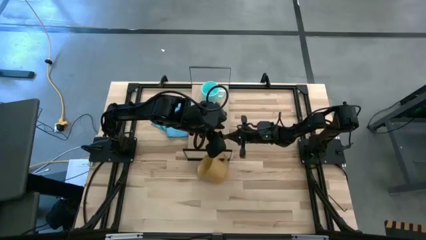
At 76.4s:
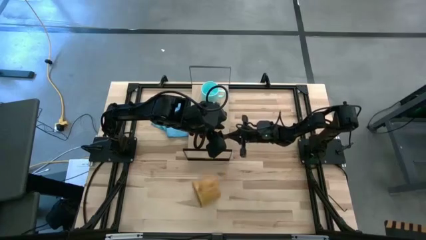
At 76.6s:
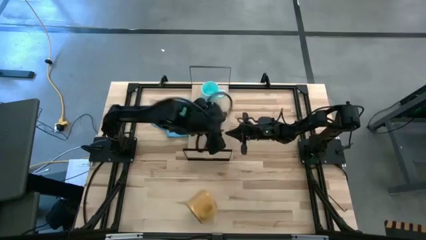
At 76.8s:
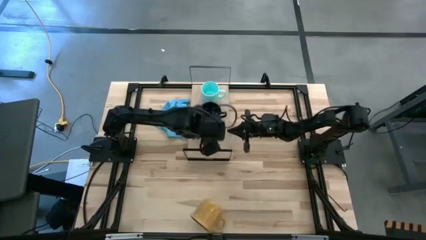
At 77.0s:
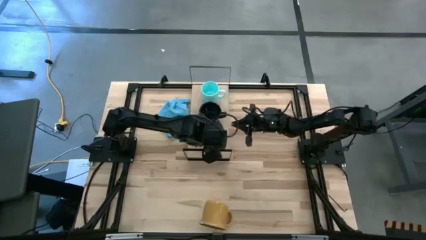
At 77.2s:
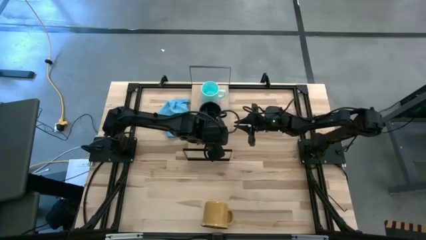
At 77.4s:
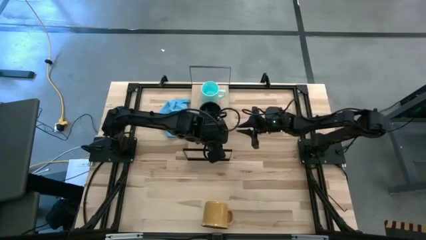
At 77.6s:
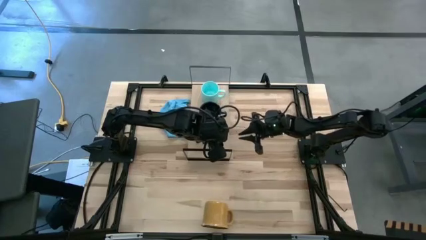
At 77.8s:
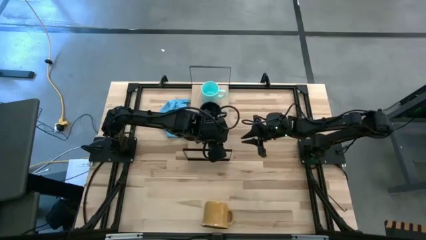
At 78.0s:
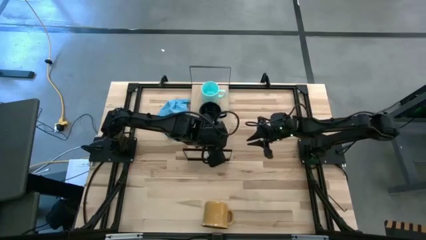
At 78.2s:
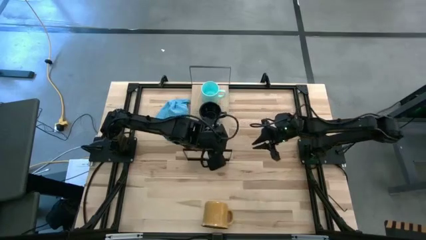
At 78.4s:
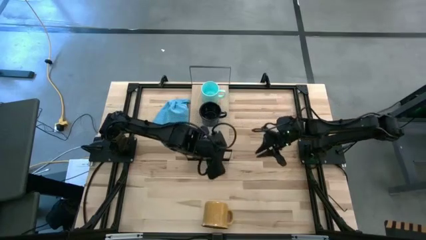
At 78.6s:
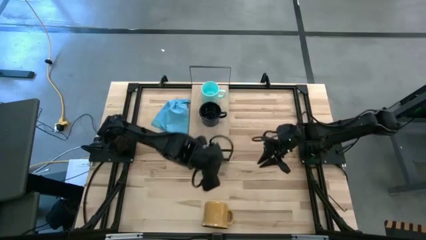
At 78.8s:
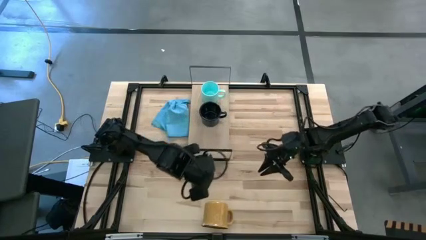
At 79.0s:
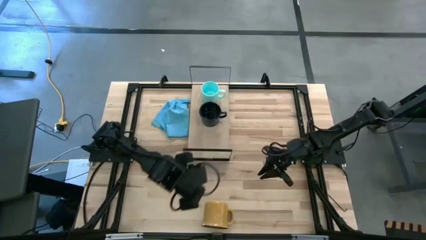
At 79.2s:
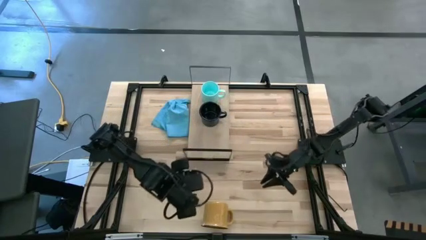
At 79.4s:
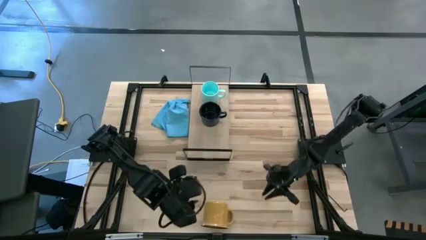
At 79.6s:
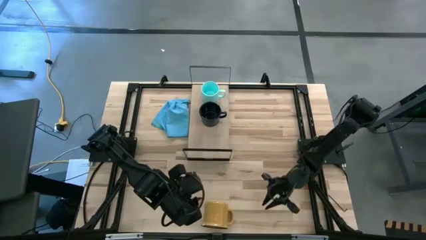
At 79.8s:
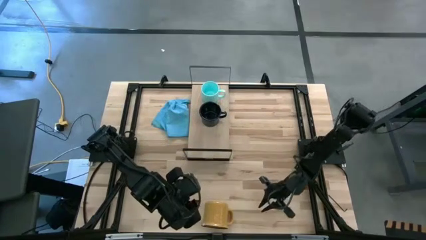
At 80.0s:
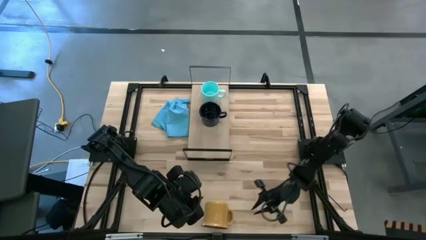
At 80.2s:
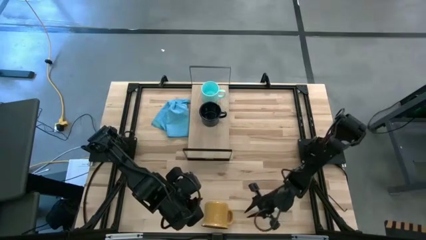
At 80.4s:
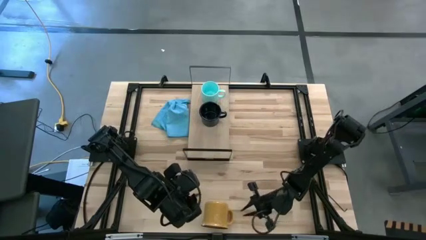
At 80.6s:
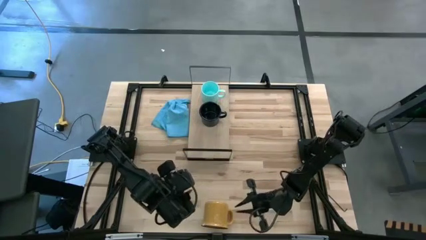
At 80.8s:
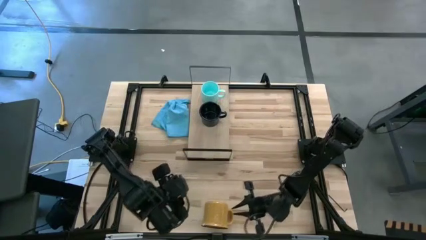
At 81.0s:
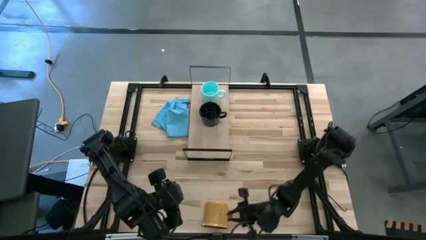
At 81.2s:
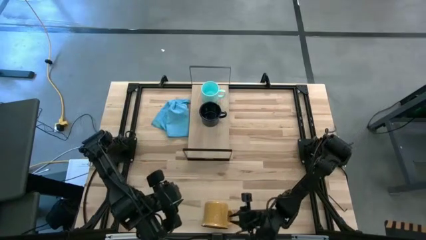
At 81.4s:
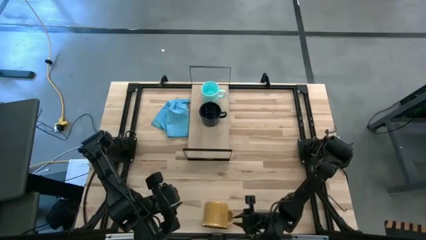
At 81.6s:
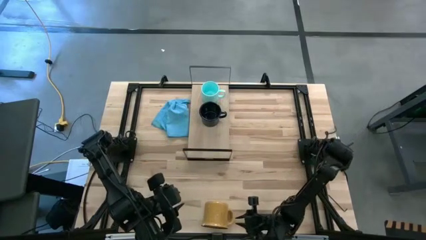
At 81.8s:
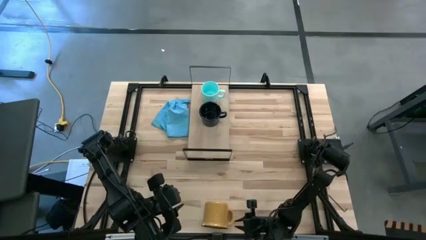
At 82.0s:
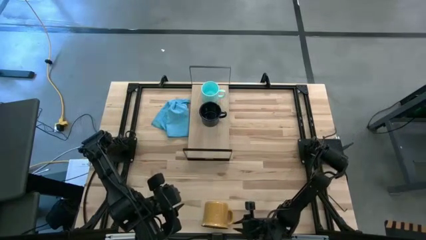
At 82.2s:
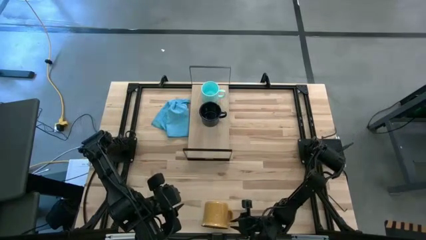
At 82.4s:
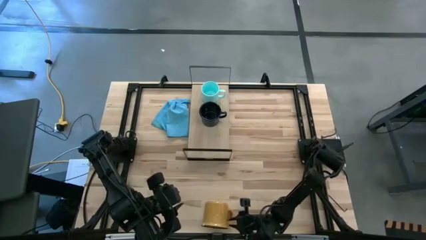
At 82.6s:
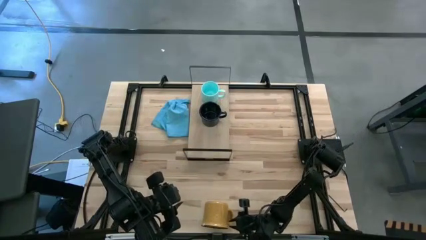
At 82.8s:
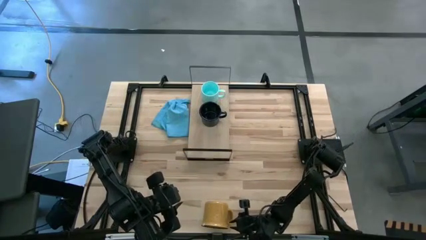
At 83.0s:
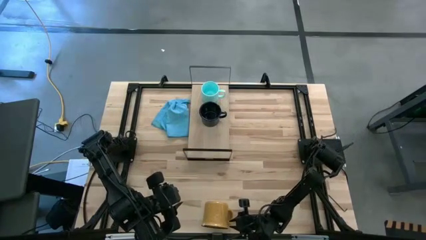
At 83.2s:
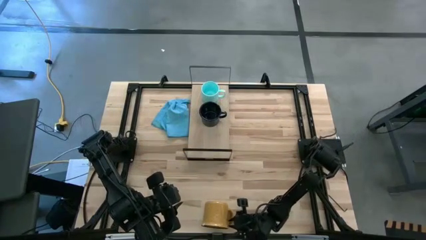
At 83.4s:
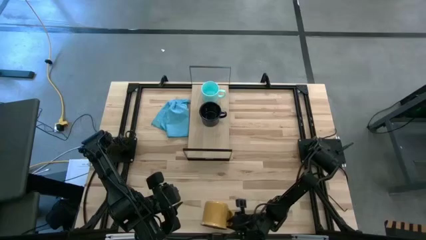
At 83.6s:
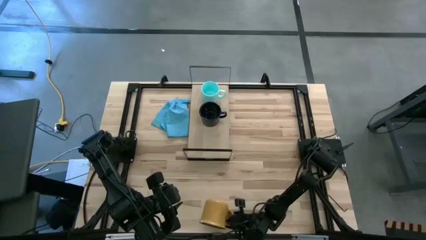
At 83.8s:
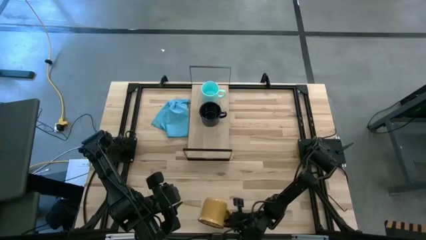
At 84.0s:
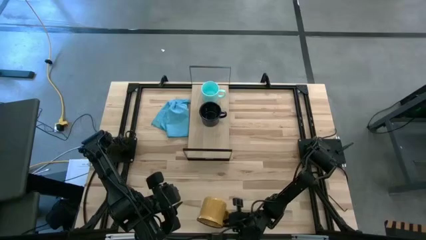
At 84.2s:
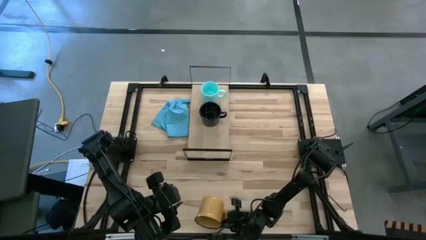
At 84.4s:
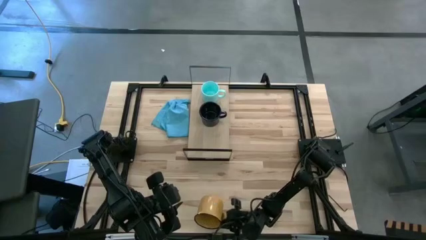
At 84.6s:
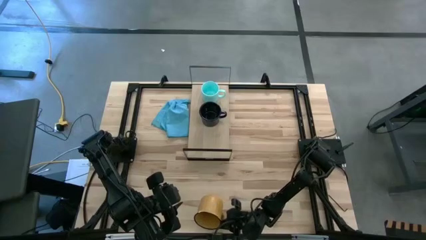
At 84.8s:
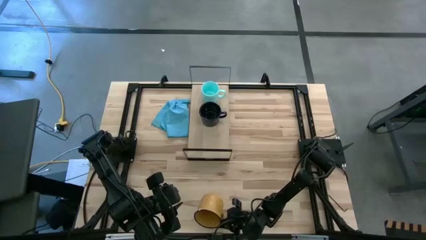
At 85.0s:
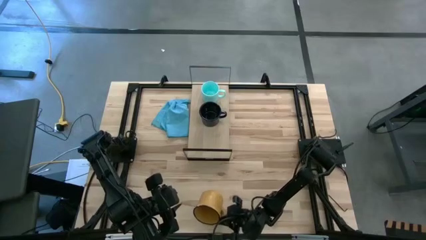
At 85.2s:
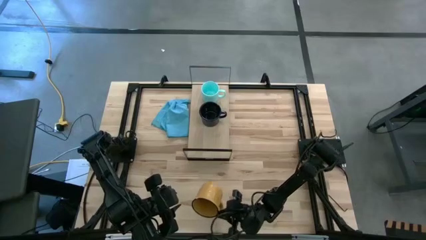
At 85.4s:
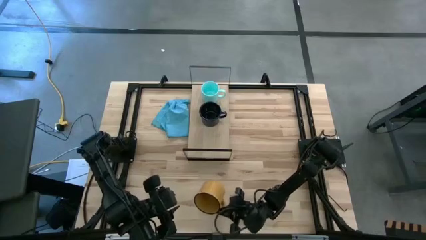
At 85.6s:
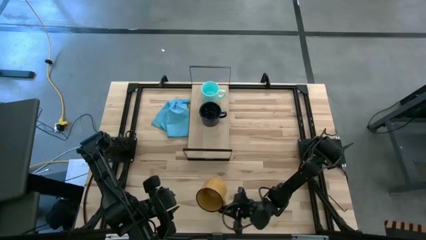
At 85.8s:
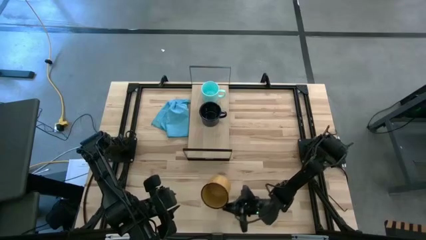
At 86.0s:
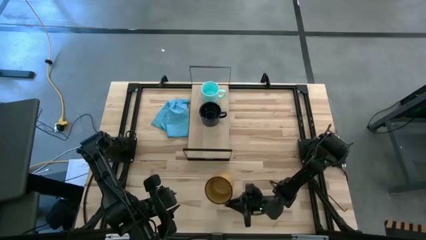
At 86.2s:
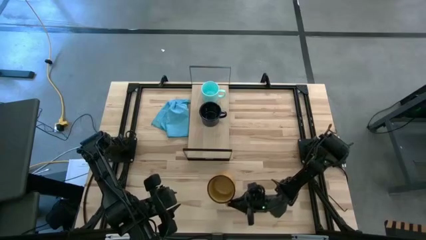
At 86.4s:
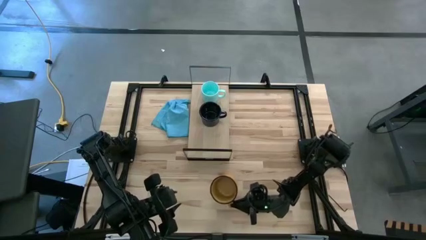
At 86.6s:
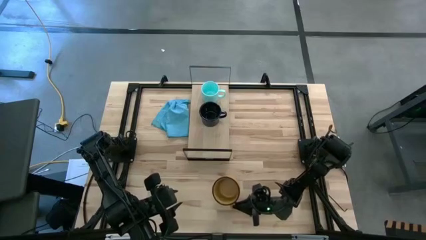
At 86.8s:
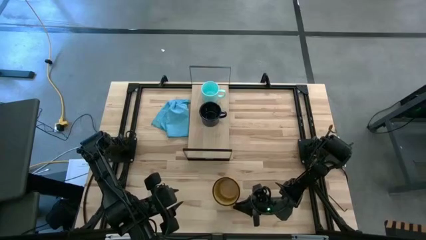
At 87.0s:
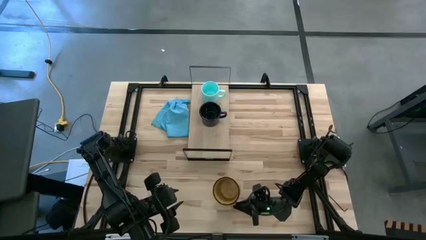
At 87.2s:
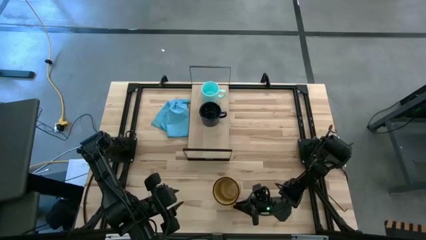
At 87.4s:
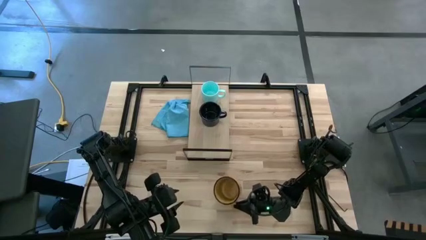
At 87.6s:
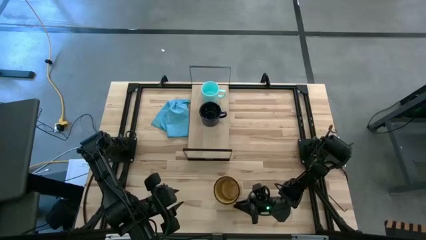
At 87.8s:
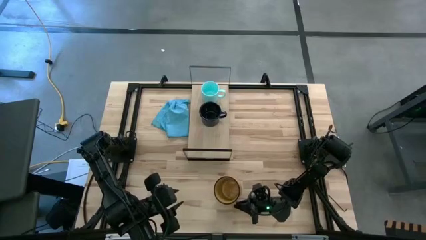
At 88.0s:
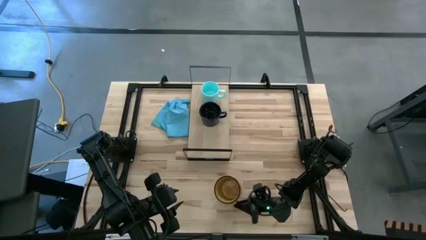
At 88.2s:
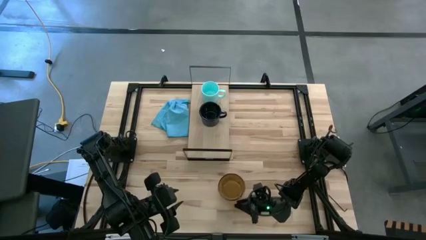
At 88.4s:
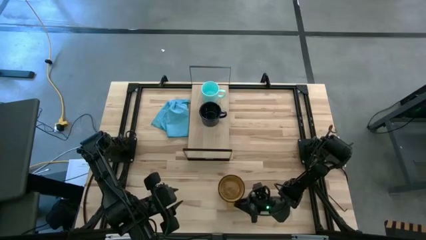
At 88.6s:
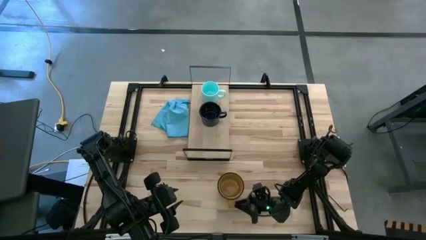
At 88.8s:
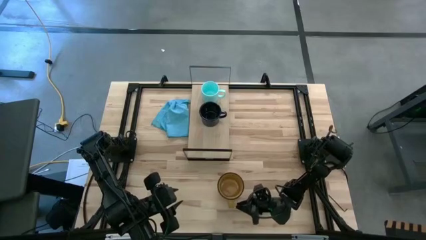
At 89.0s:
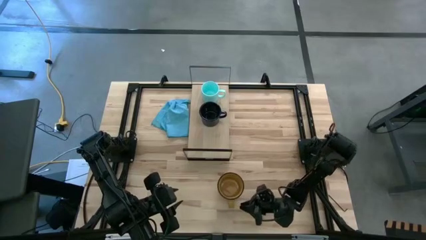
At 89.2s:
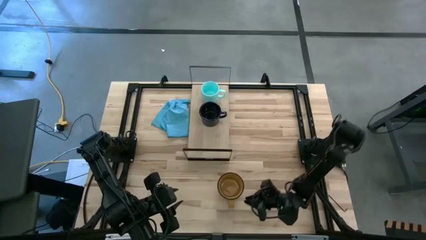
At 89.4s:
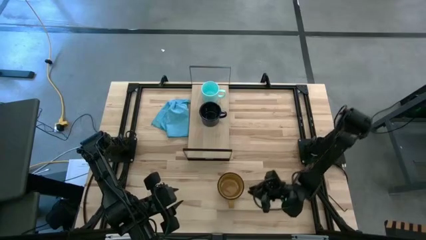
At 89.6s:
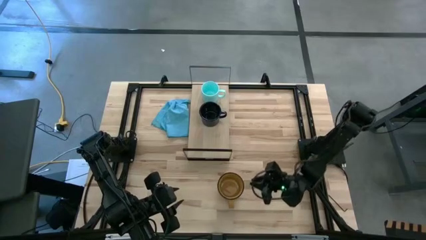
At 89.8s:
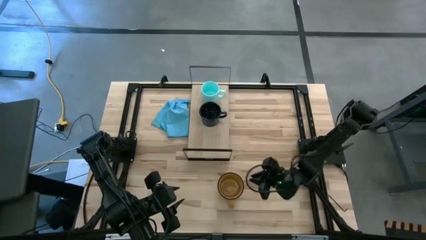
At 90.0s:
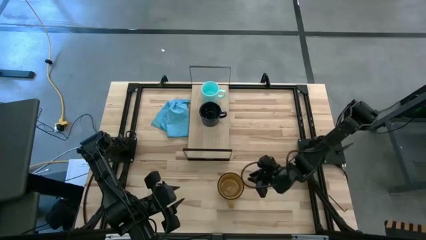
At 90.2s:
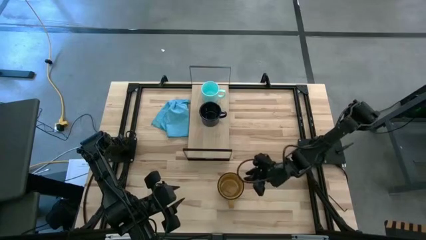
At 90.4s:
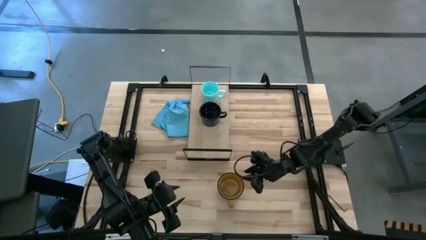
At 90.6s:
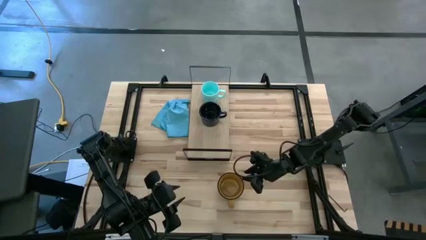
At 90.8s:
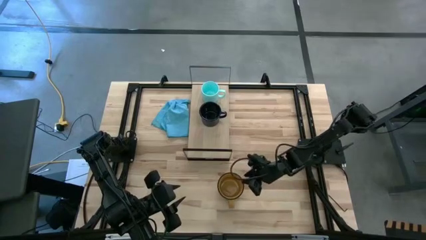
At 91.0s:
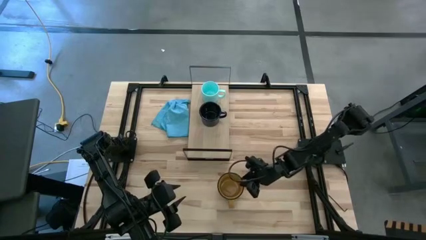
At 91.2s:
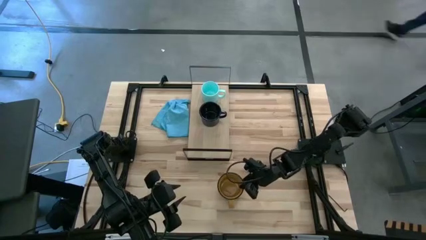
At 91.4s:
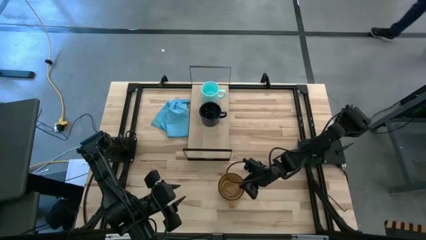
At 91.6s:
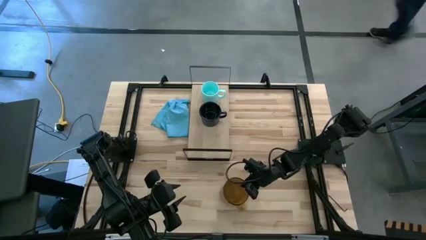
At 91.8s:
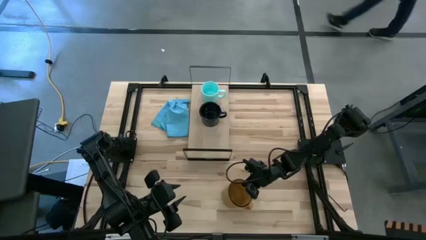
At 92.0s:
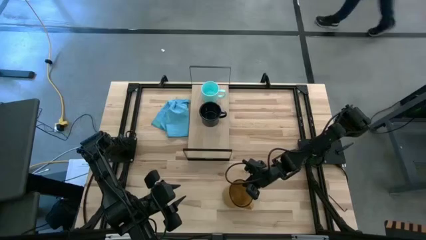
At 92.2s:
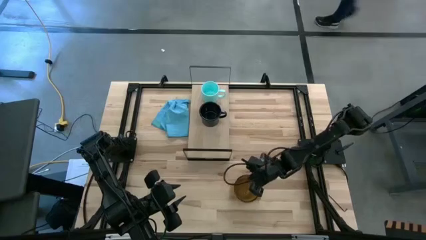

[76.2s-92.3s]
Task: Stack small to large cups/mugs on shelf
Put the yellow mug on the shelf

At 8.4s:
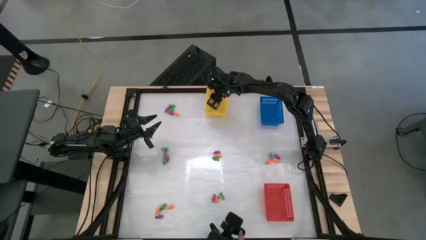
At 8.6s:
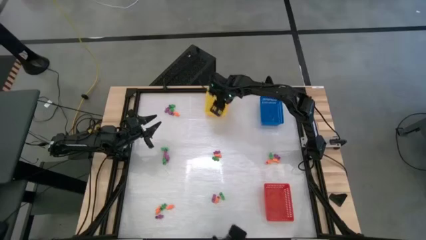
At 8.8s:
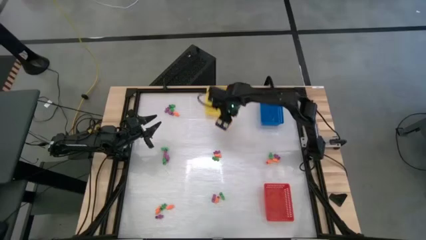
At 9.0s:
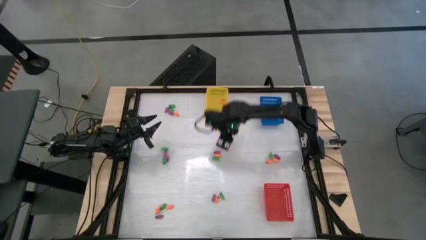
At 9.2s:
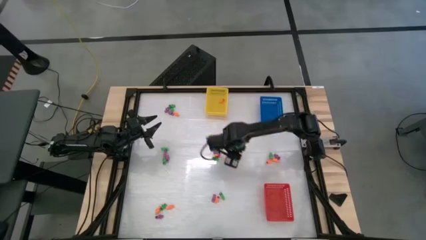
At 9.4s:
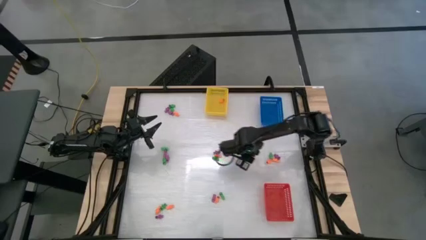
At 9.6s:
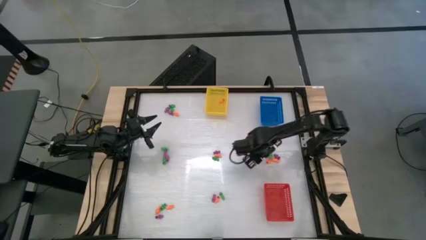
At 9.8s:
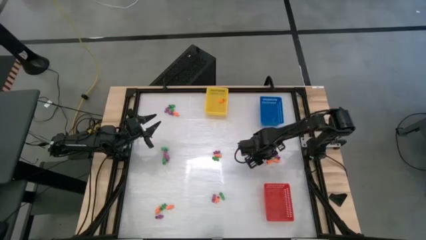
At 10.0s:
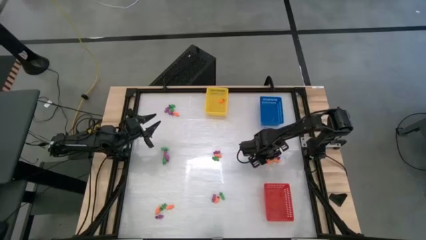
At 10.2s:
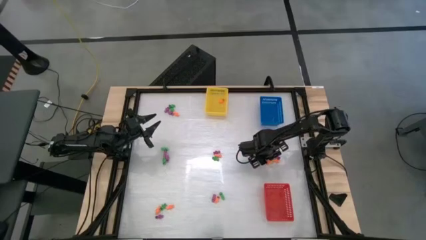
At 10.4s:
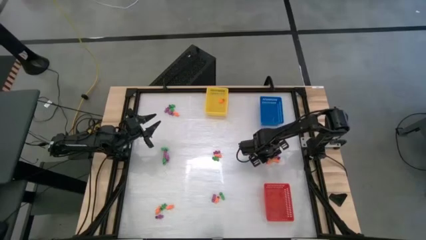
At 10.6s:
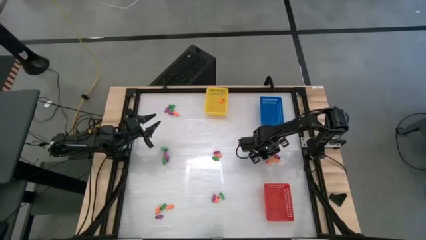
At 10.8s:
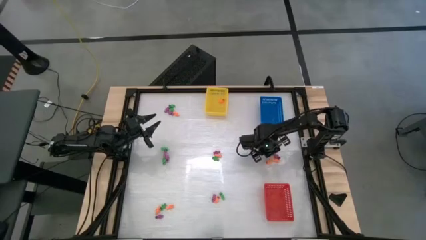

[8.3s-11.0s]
Task: Sort Halloween decoration
Put the green skeleton toy into the blue bin
